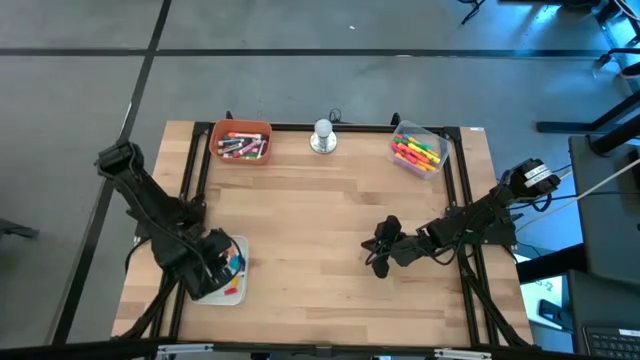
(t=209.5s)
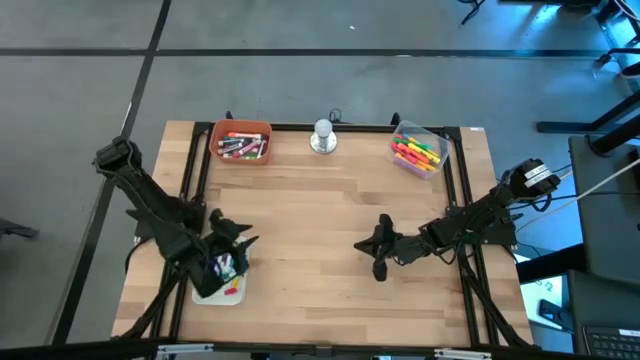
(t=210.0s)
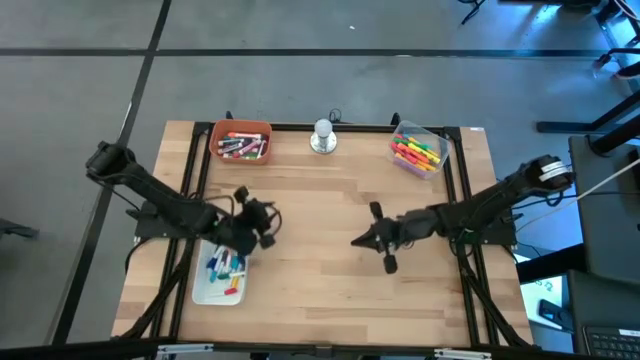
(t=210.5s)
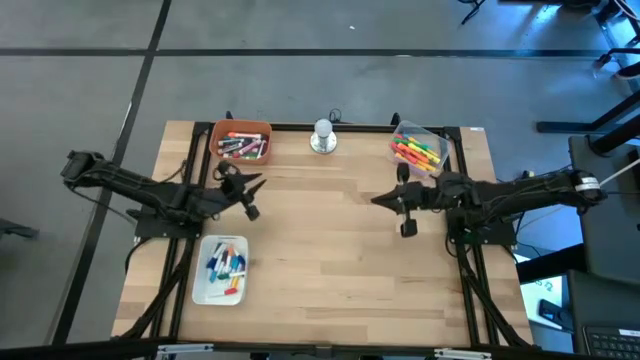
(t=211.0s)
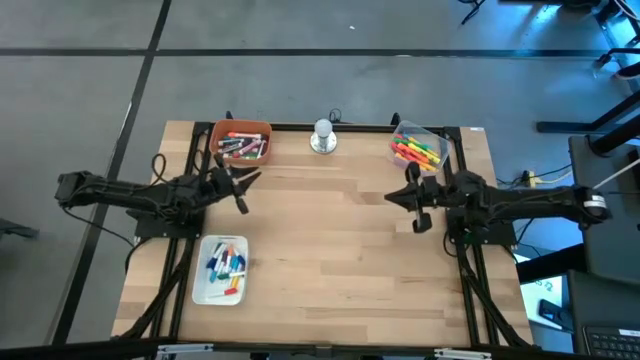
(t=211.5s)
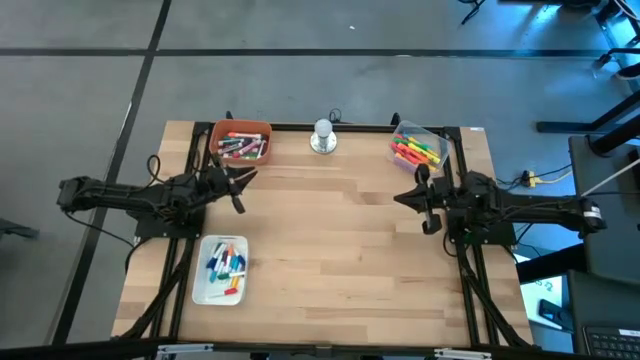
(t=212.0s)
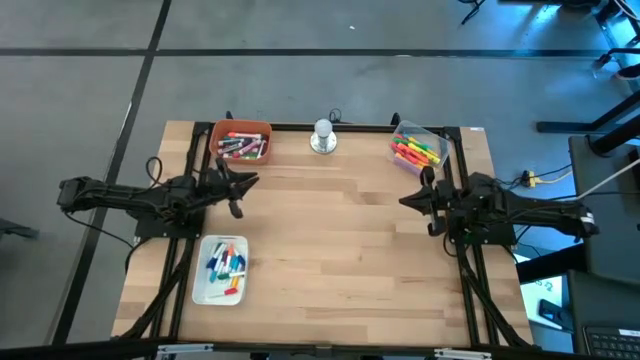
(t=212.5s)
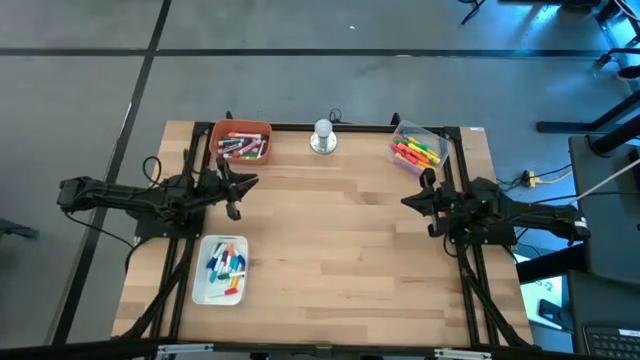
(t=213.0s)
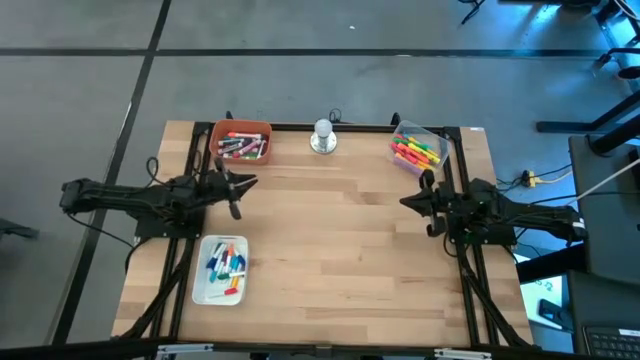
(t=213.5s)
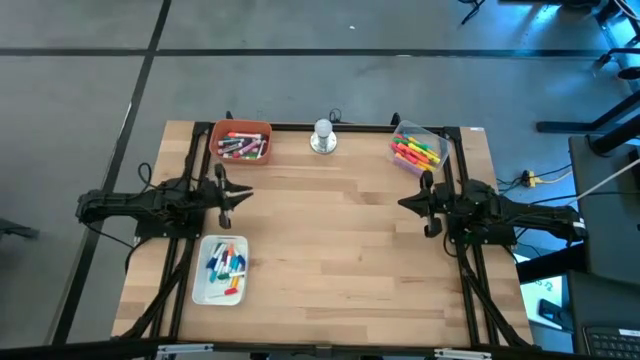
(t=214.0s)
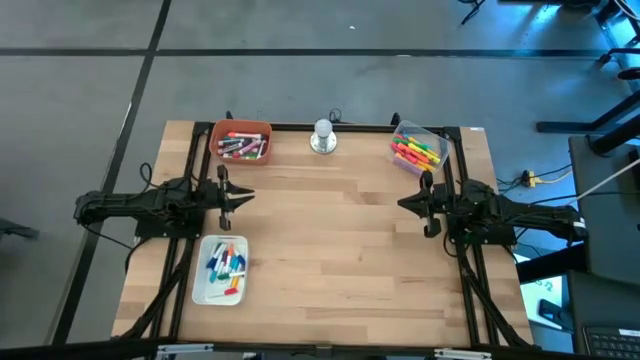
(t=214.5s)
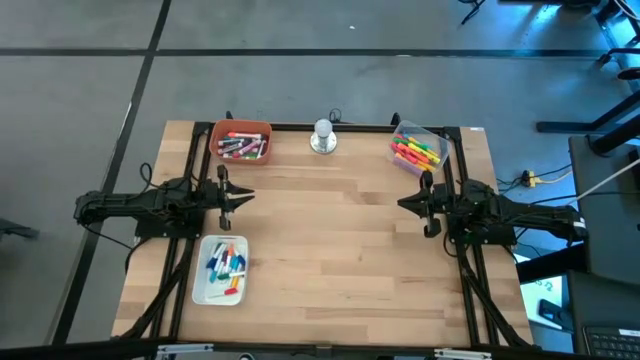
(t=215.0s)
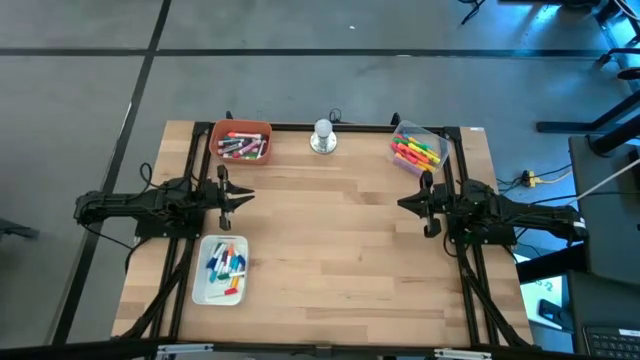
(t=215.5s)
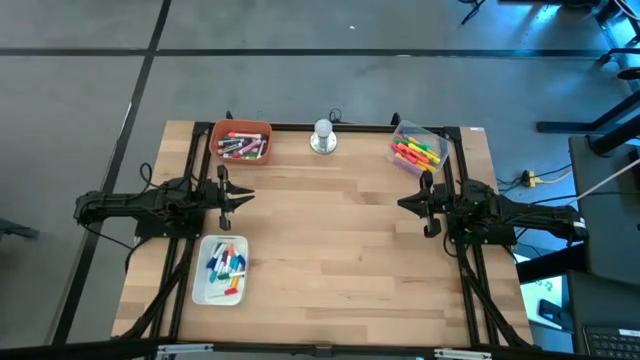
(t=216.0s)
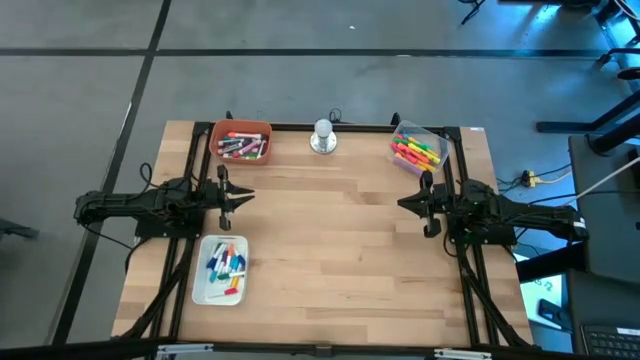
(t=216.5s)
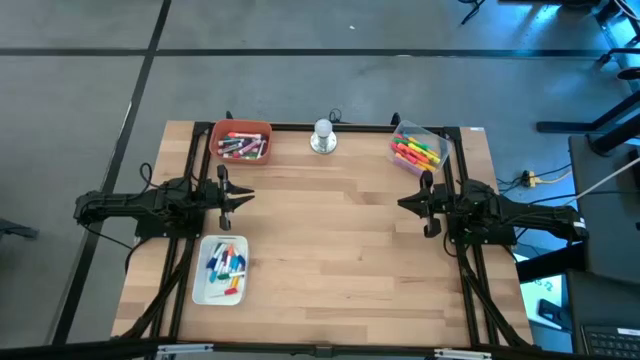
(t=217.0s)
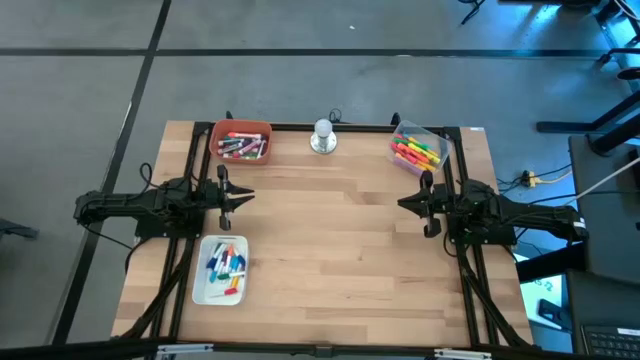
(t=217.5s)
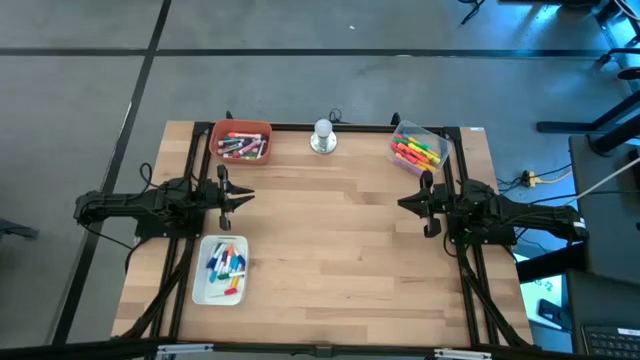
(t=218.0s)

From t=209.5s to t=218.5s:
Task: Pick & Place Markers
Return to Home Position

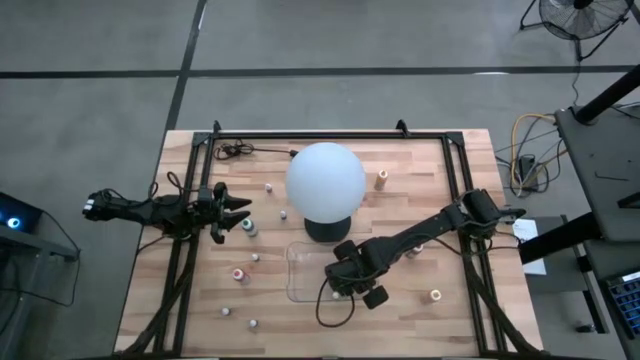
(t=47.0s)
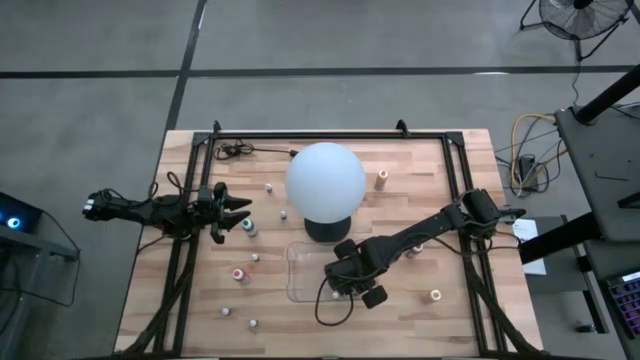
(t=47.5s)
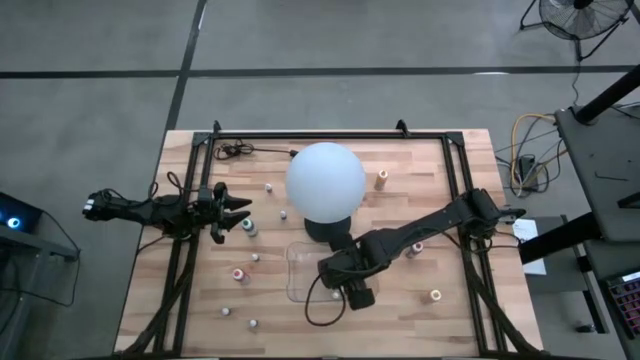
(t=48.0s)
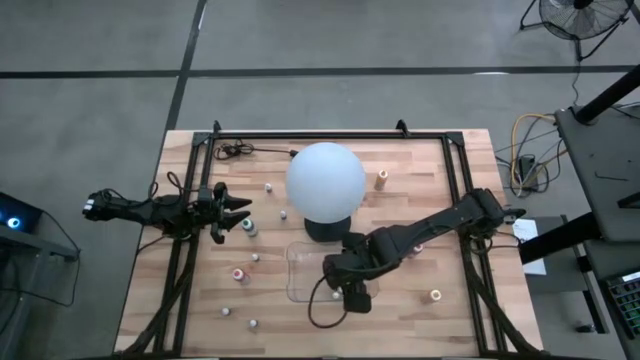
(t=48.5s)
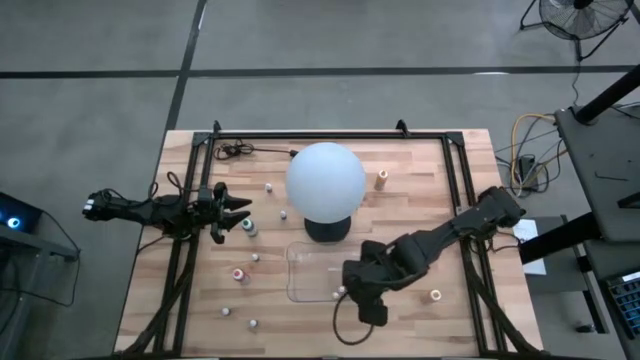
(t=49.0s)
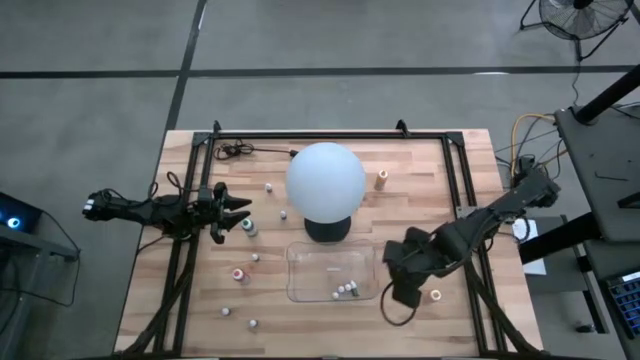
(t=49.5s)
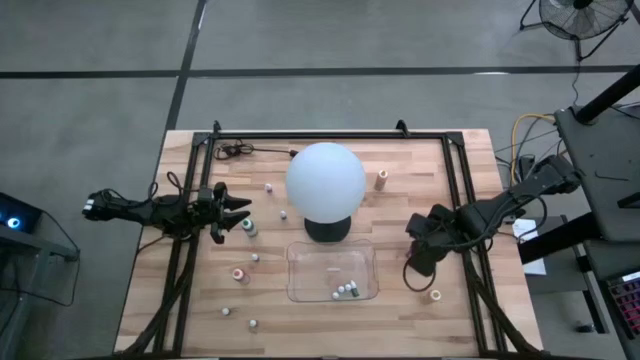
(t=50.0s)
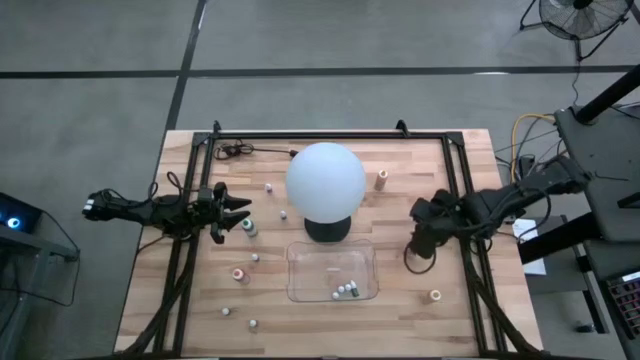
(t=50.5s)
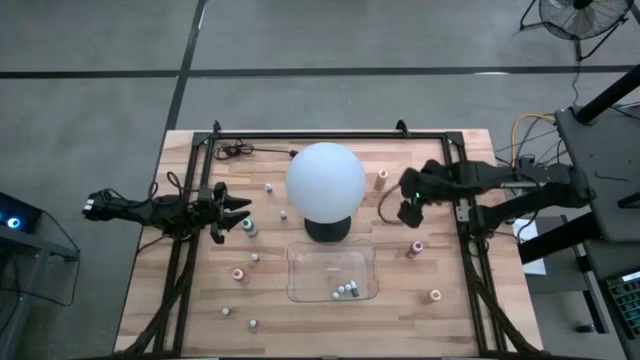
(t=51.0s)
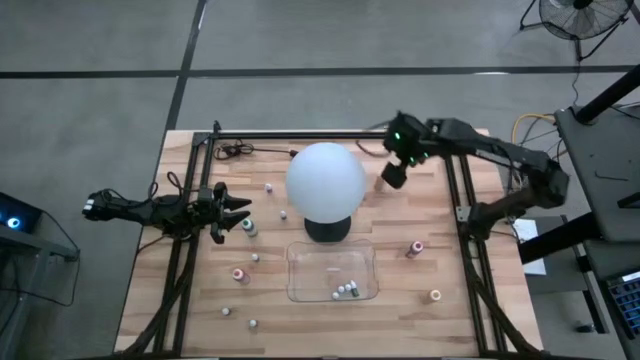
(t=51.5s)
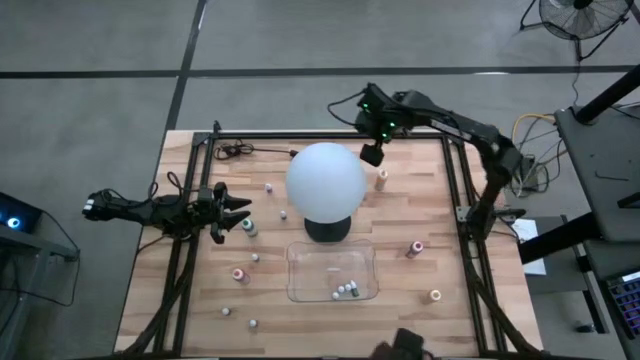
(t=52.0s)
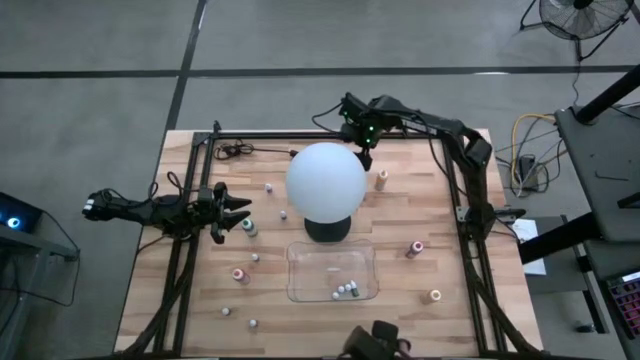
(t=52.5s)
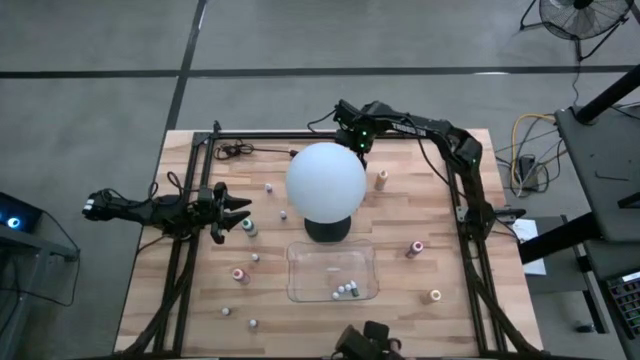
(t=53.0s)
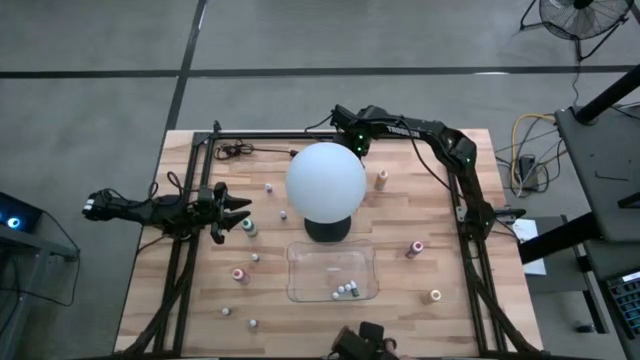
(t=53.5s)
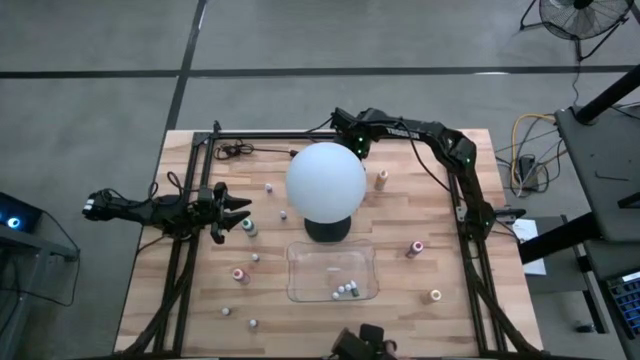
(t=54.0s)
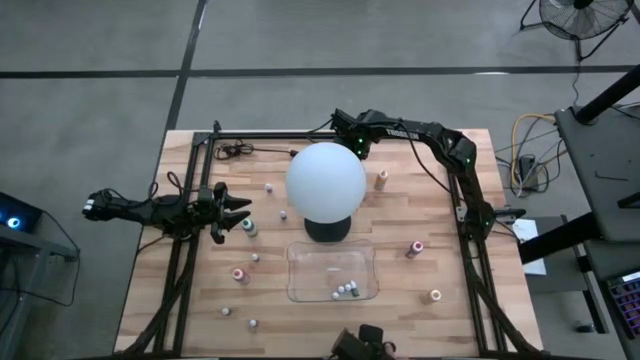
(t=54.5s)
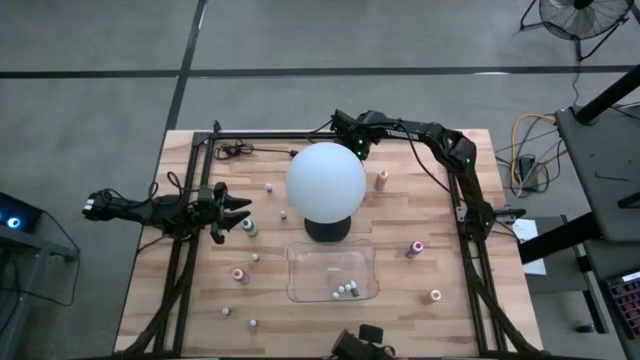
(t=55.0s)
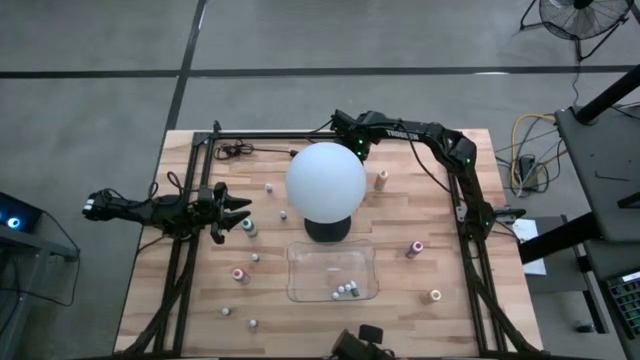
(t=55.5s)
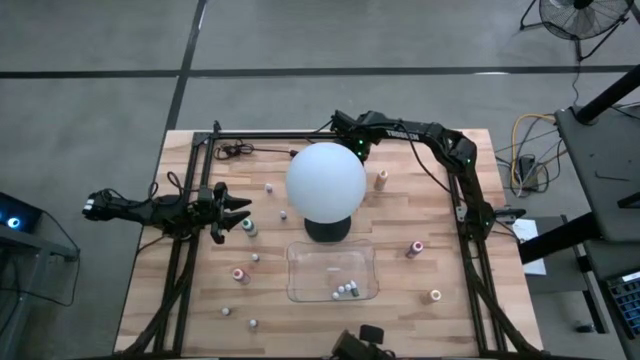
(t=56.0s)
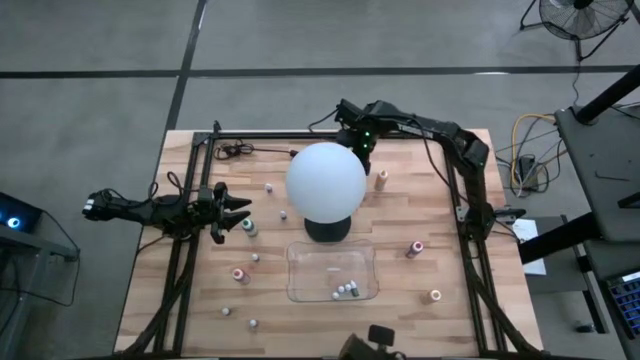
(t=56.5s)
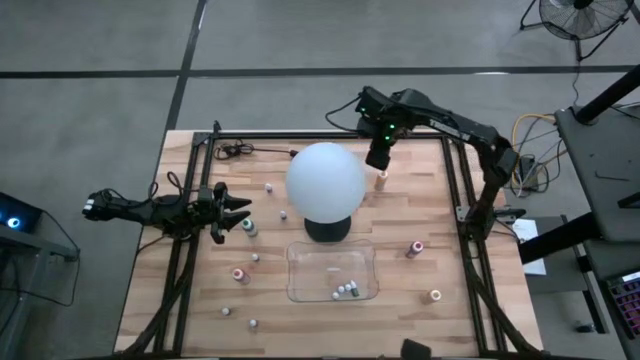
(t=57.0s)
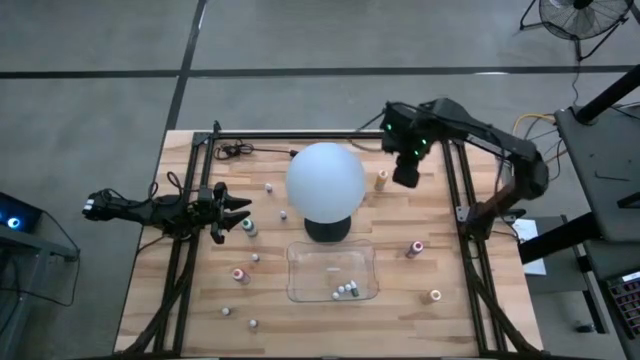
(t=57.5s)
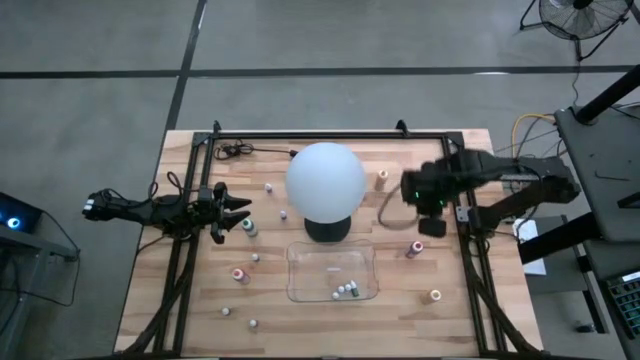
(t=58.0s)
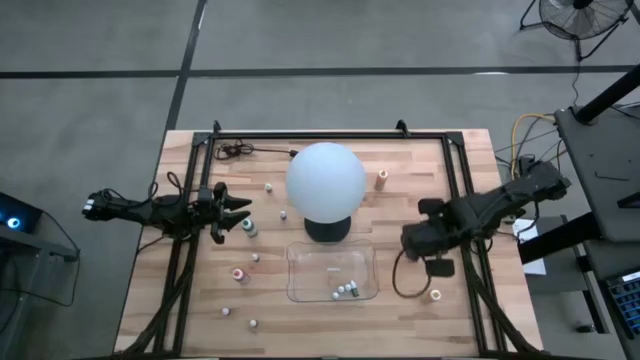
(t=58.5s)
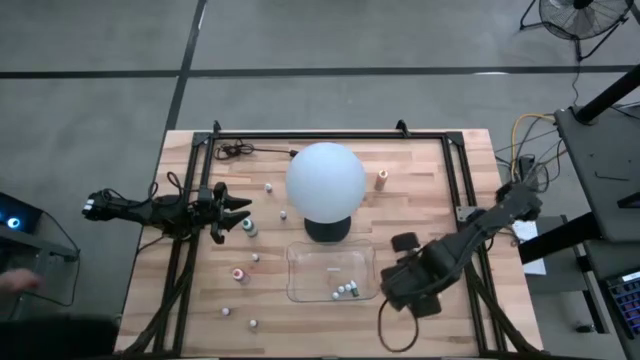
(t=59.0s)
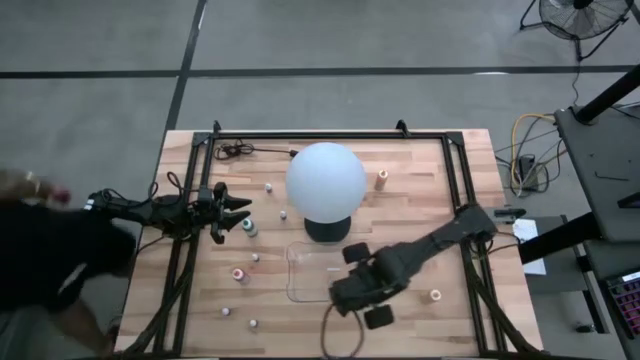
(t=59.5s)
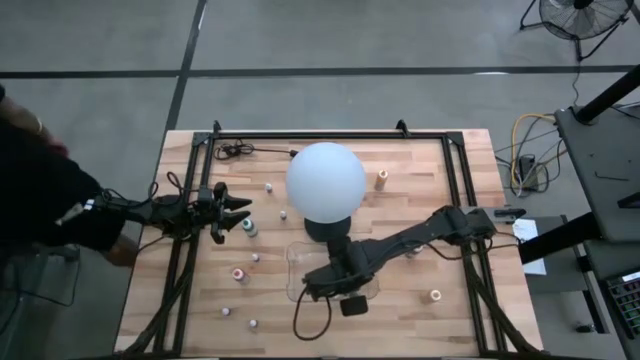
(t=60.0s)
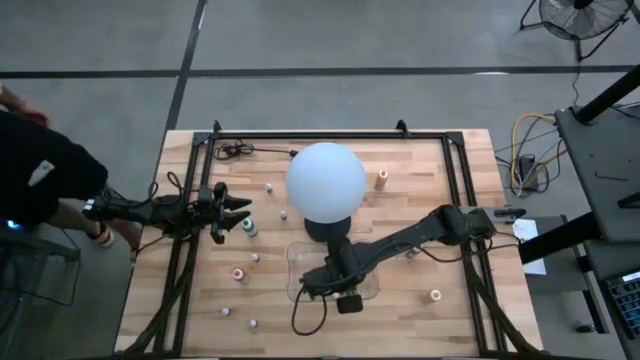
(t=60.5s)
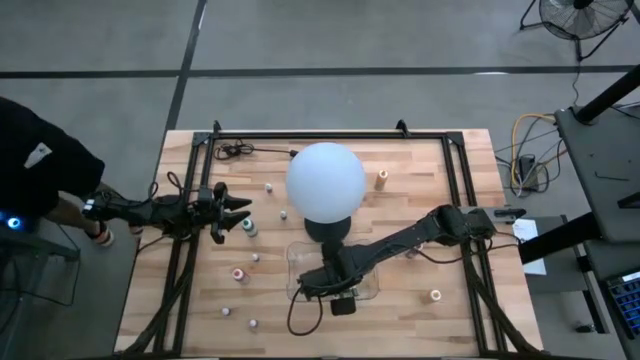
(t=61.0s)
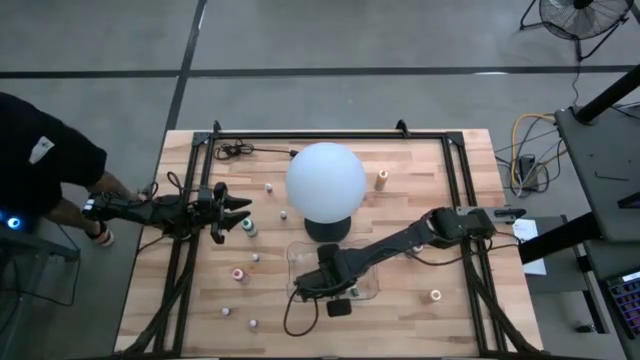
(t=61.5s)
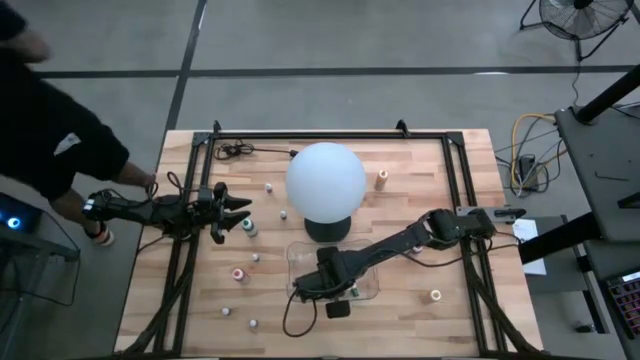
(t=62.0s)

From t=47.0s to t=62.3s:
Task: Pick & Place food coloring
Put the small orange food coloring bottle into the transparent bin
